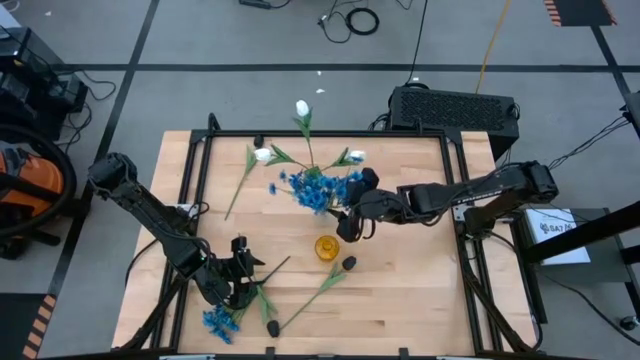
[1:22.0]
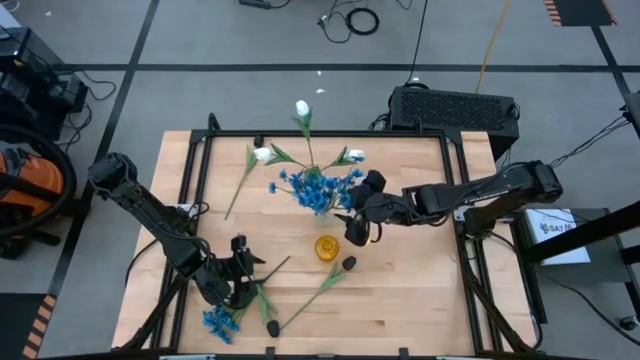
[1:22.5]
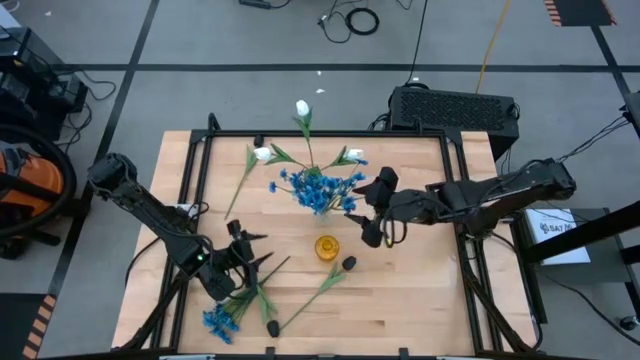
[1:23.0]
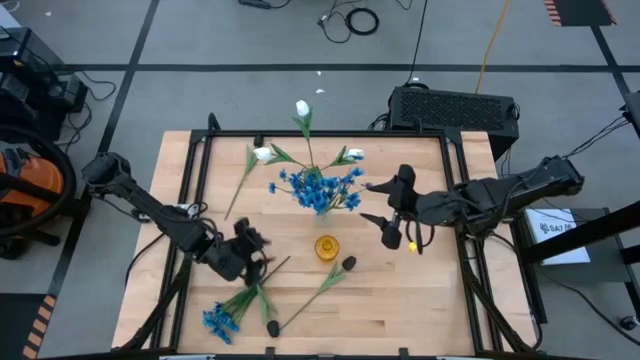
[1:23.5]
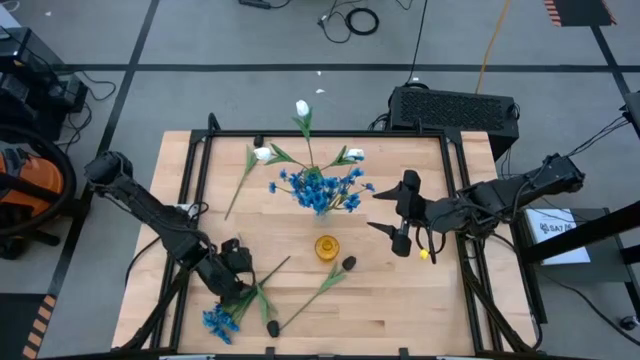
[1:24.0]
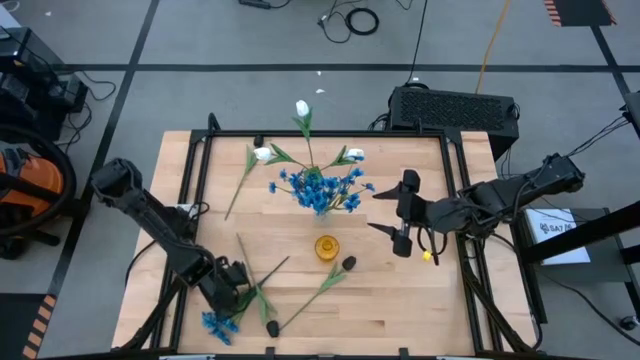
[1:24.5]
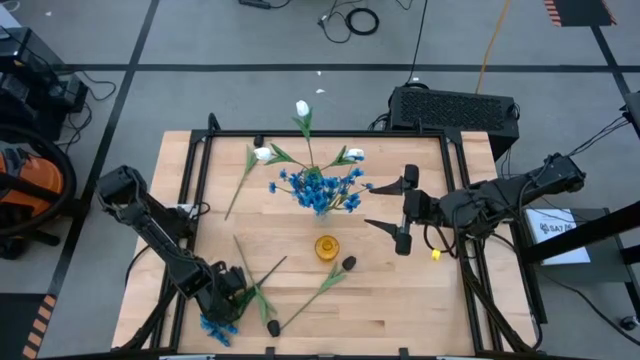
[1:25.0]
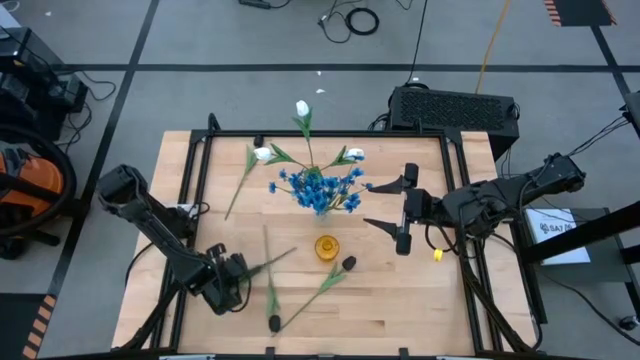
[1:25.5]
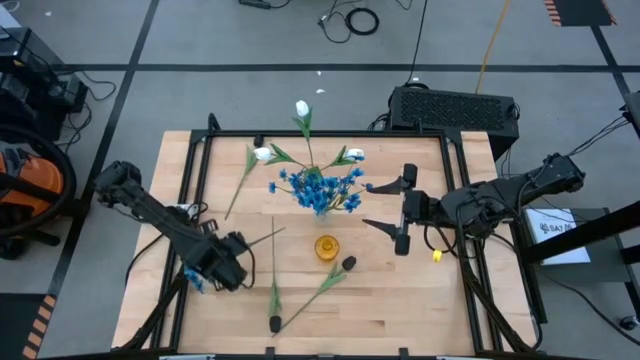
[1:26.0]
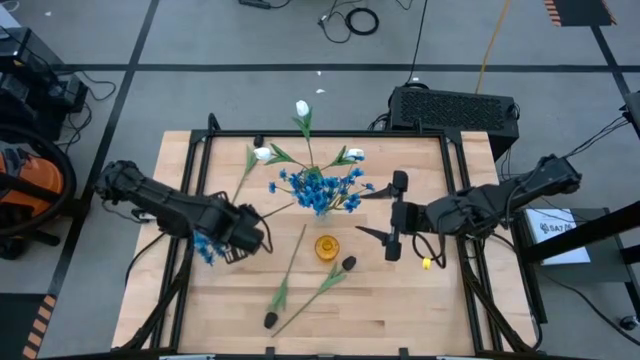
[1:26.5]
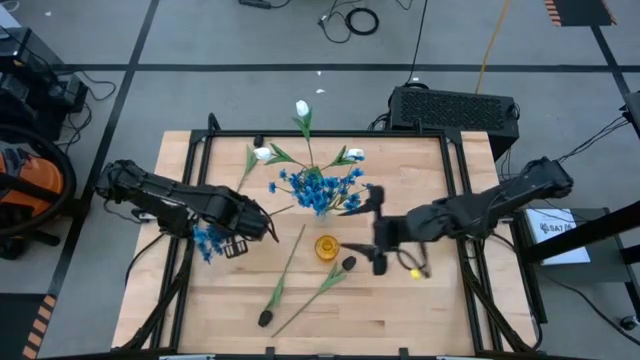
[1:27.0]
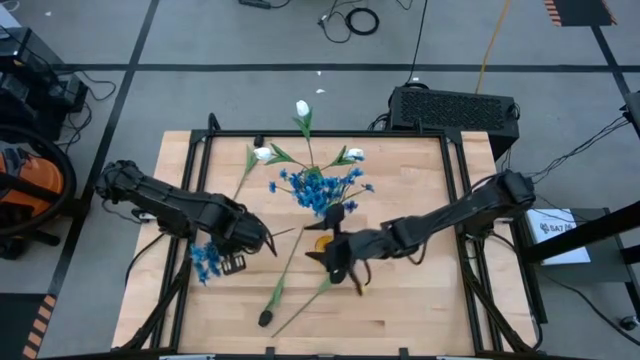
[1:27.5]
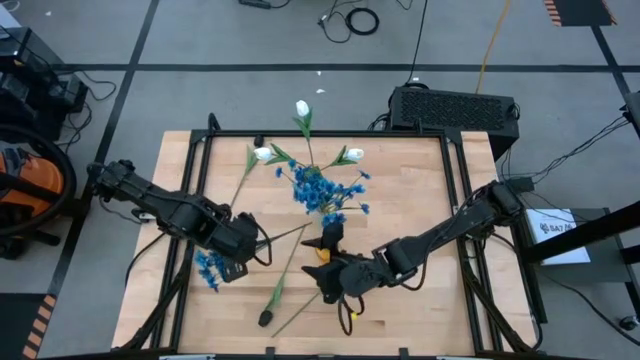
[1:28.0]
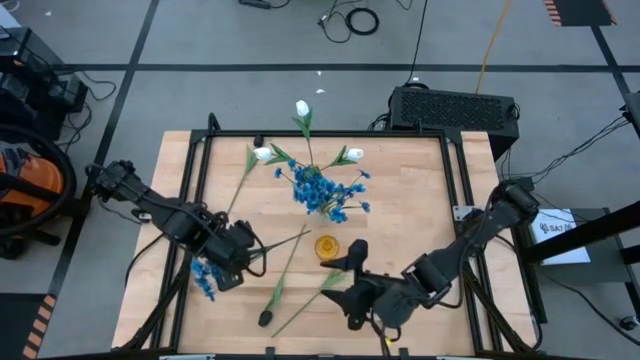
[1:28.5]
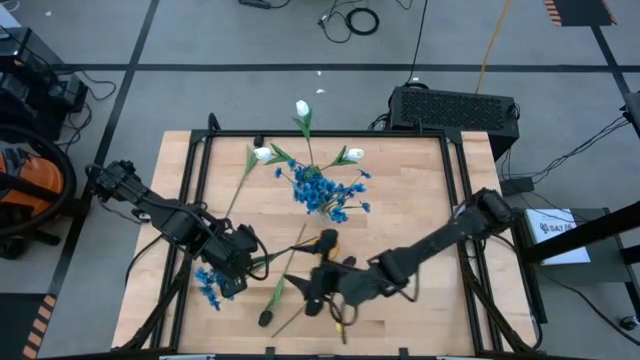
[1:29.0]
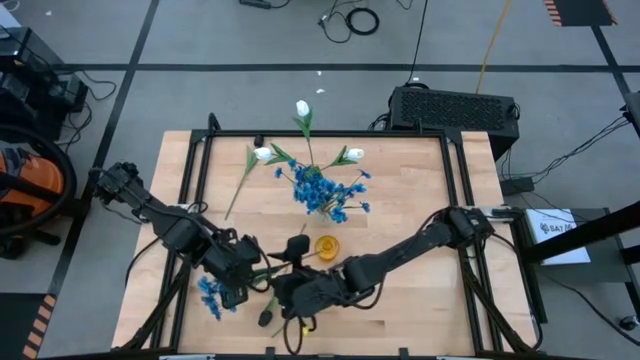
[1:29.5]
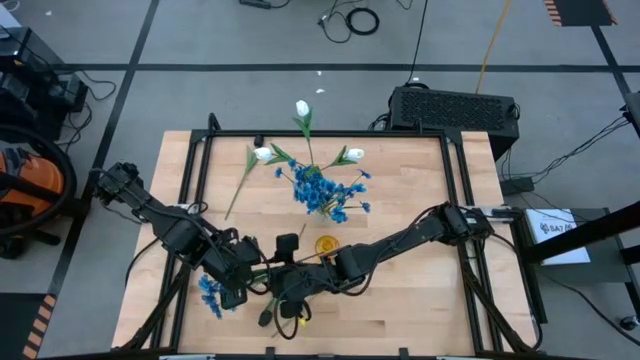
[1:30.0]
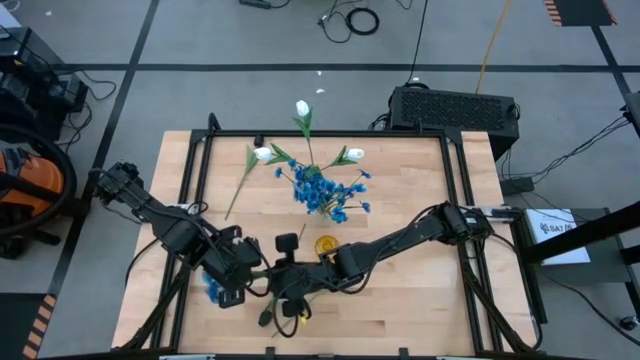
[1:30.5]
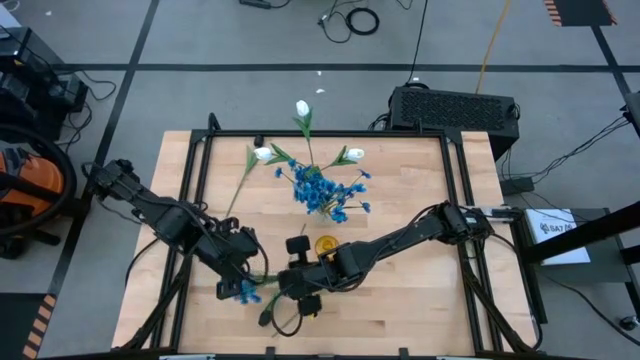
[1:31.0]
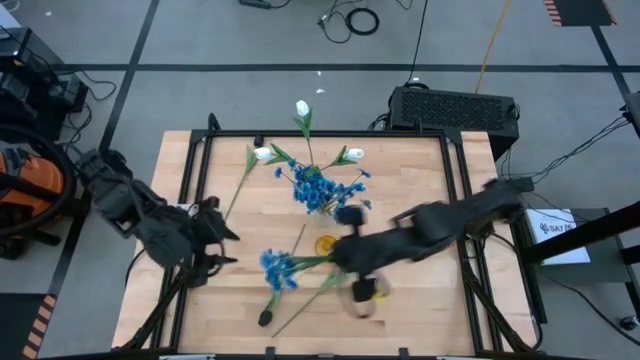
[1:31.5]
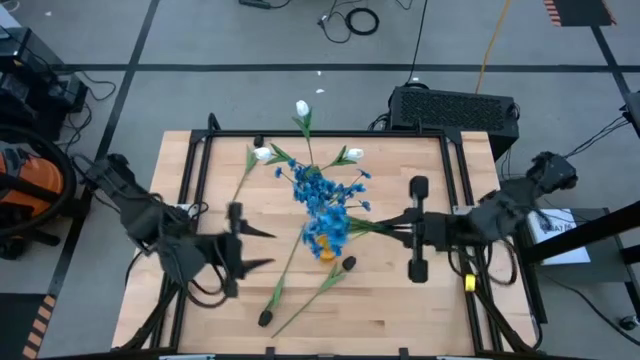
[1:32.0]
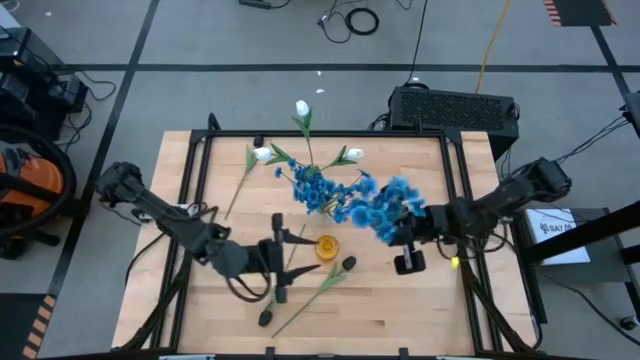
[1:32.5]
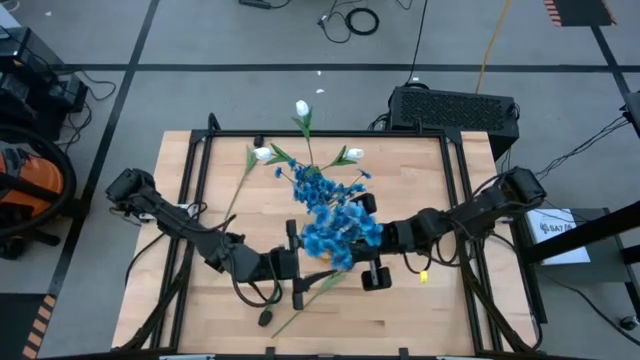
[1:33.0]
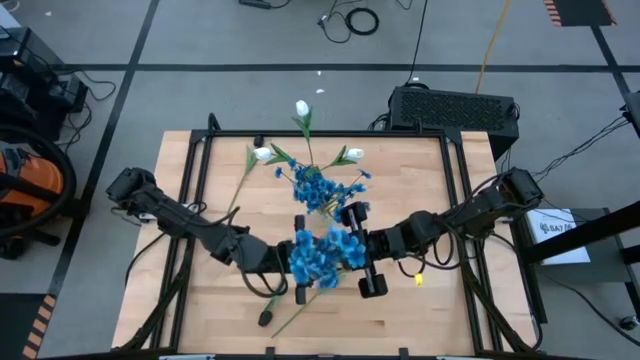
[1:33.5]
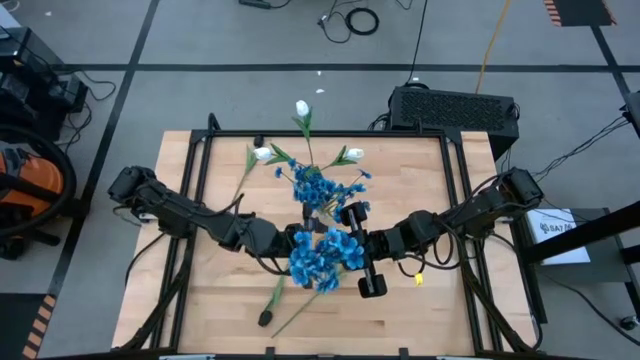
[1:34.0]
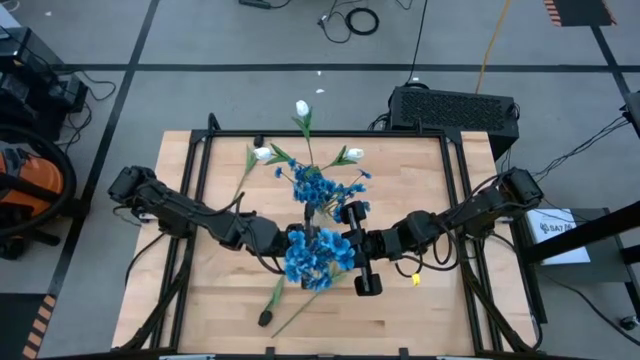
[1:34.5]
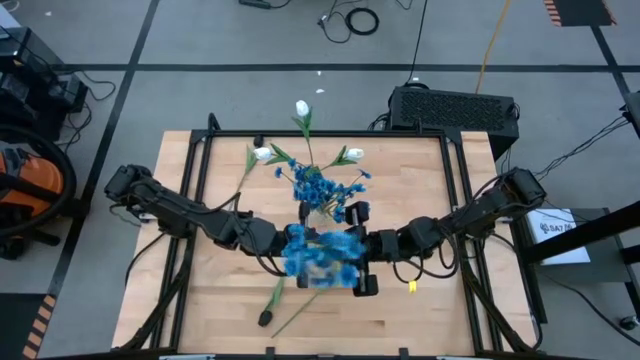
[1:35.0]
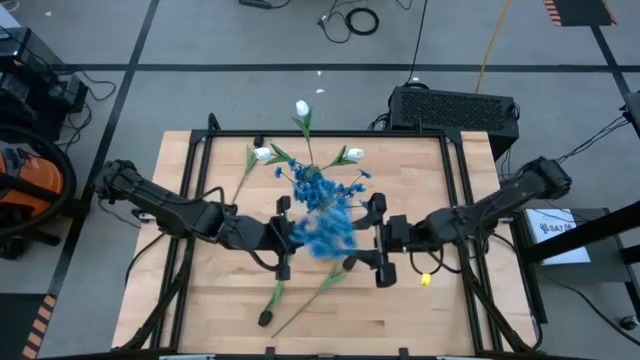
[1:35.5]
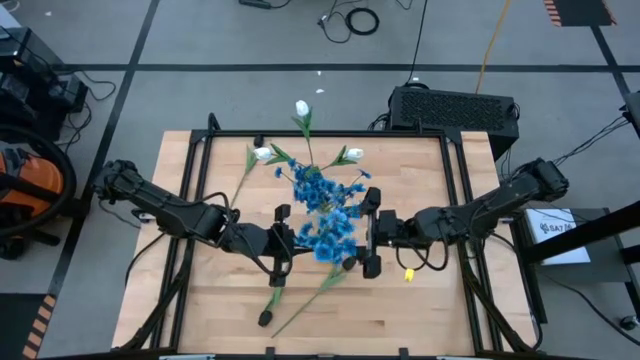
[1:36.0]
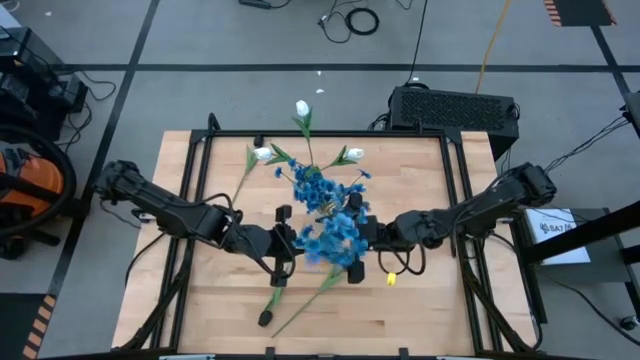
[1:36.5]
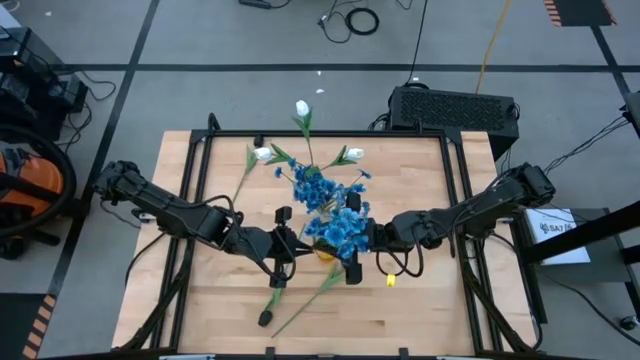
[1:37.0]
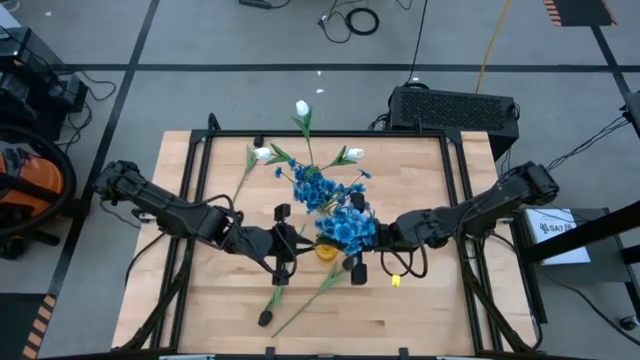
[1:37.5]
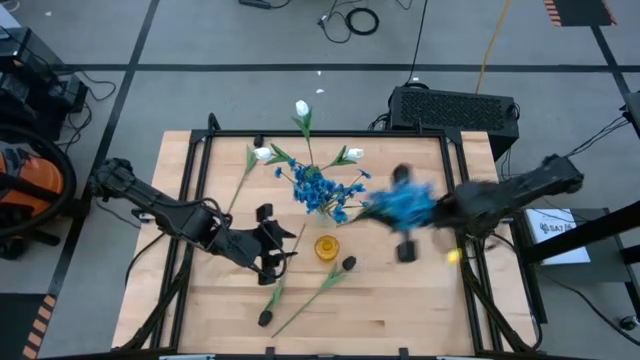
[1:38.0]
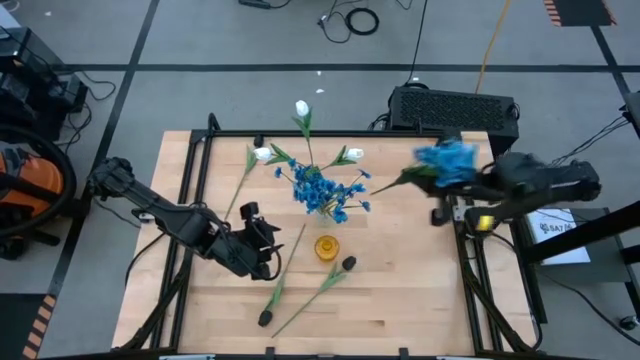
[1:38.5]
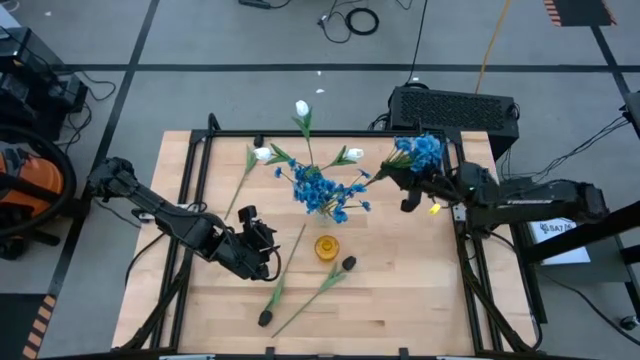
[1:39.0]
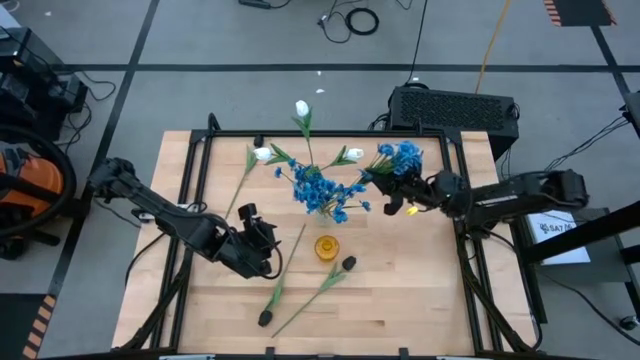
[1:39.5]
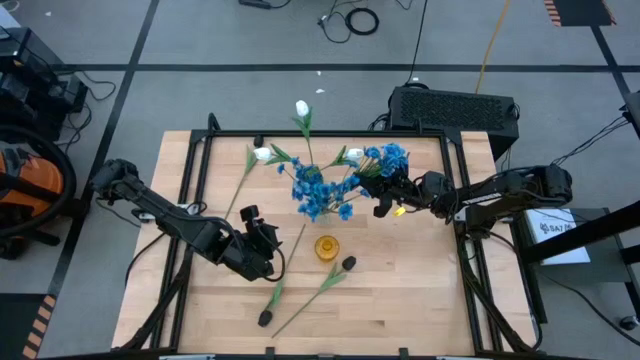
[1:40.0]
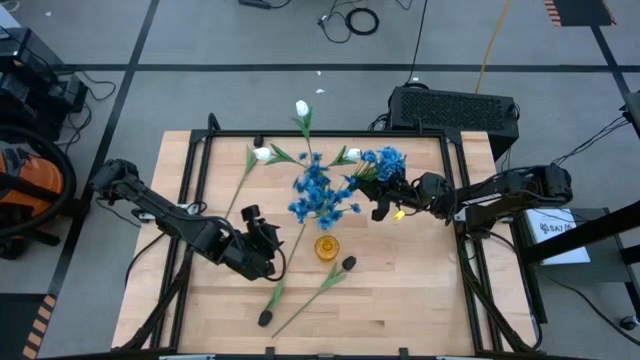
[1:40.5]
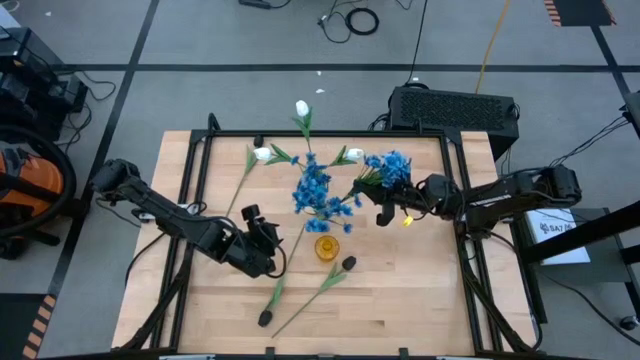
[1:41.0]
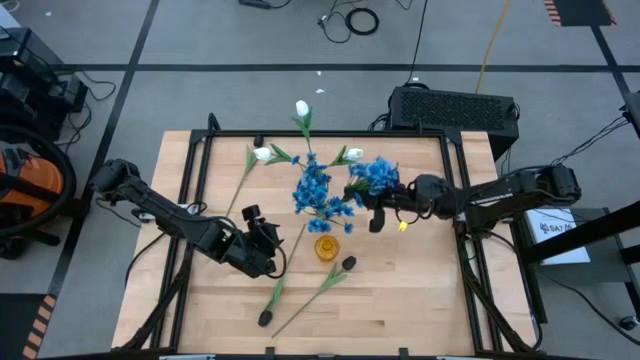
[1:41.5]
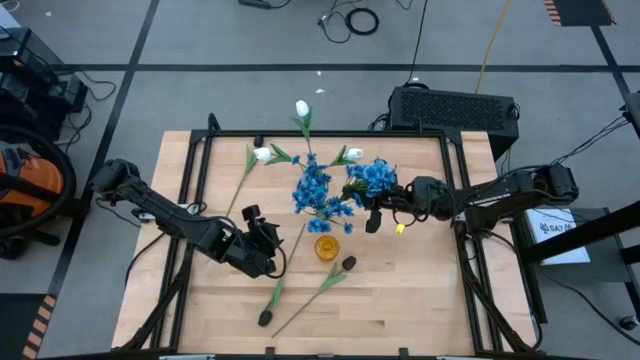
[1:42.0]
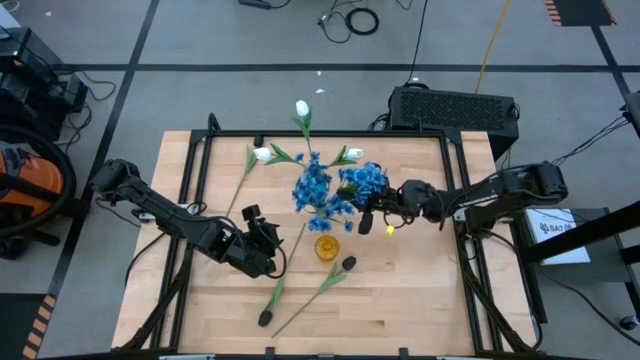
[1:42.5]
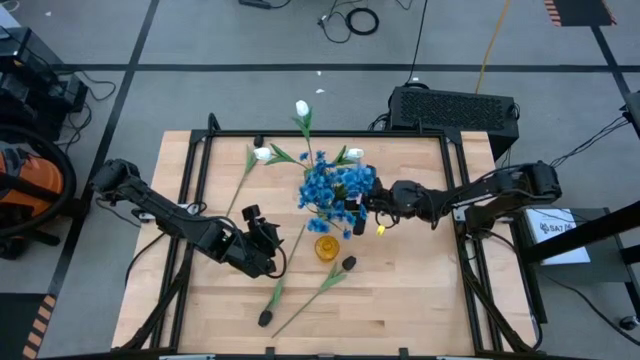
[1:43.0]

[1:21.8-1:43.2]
Task: Sort flowers into vase by color
Put the blue flower into the transparent vase
